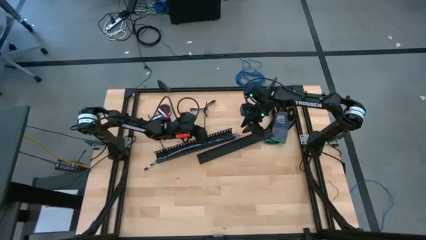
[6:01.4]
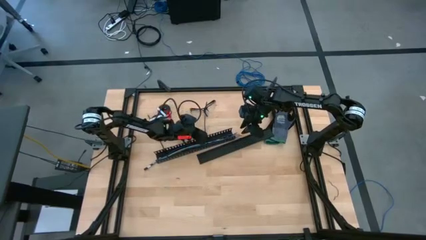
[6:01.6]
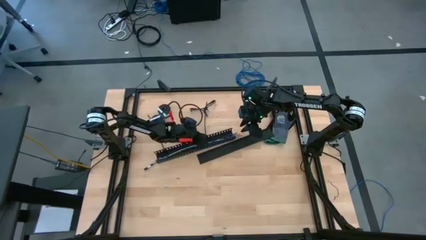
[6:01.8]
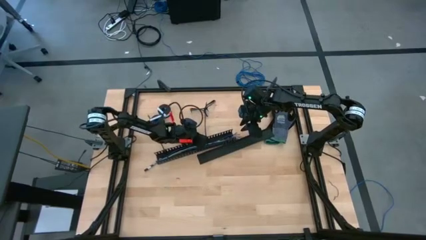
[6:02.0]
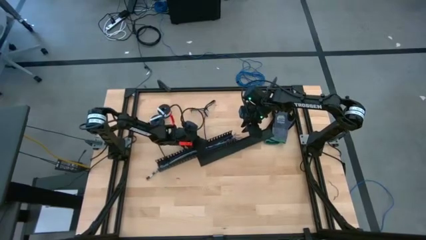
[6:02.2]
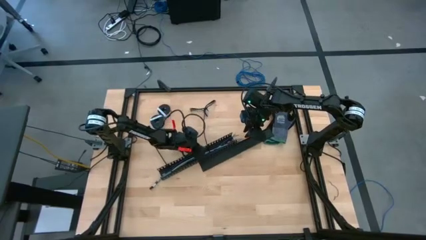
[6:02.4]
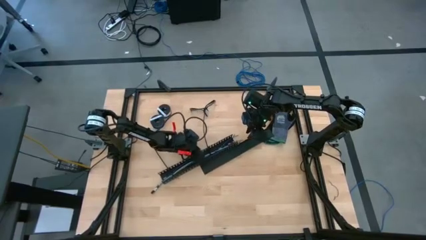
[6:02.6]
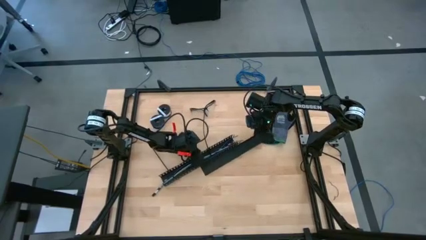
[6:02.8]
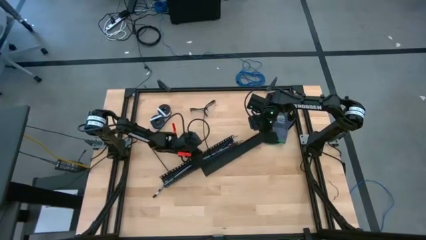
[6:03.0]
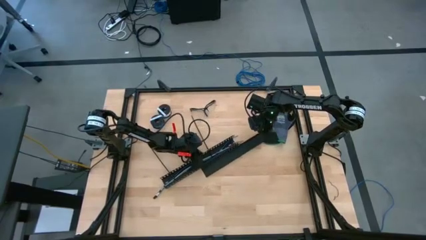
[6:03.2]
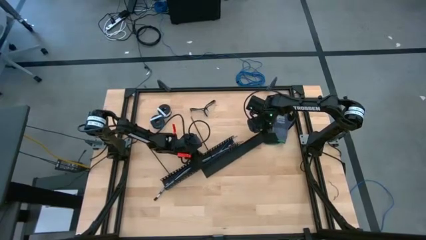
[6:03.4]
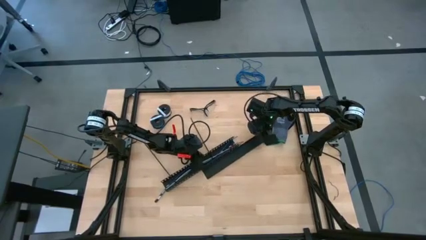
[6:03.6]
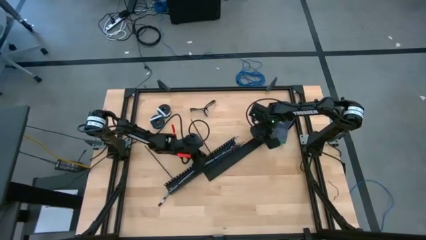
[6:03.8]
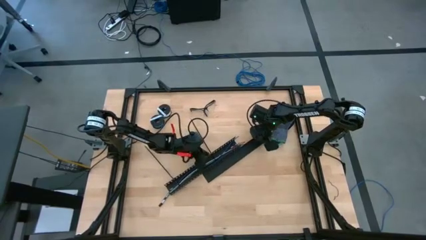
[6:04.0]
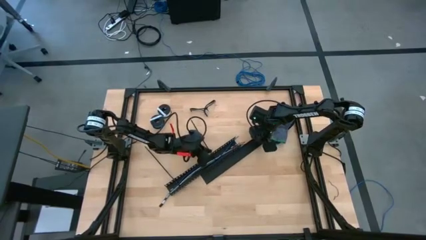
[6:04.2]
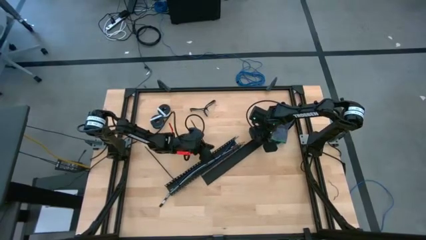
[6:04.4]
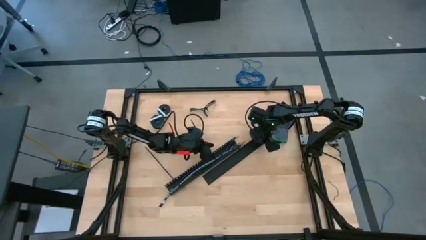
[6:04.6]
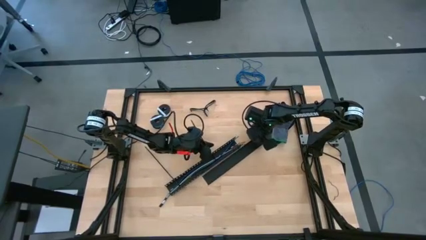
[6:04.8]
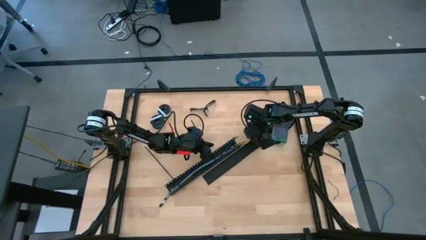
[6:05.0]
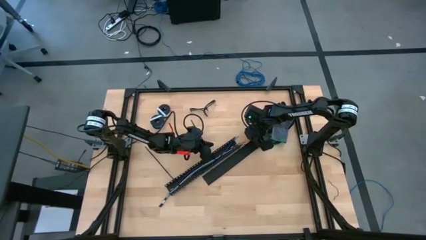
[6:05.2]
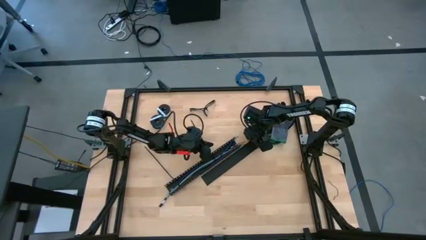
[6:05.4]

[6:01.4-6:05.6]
Task: Ziptie cables
Insert the black cover of the black cable duct

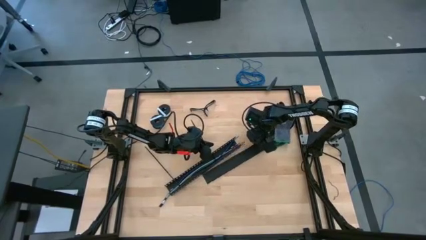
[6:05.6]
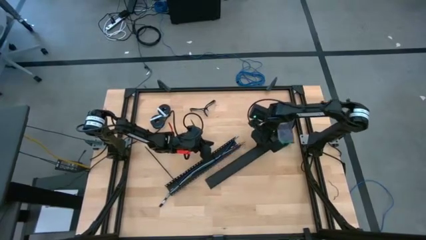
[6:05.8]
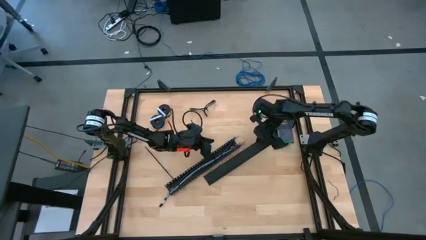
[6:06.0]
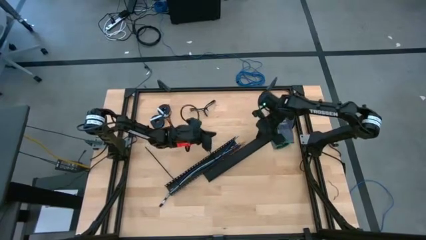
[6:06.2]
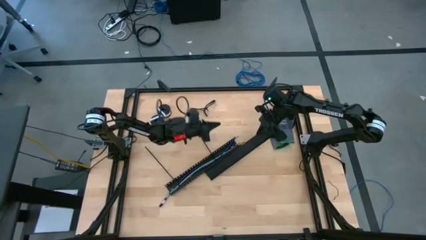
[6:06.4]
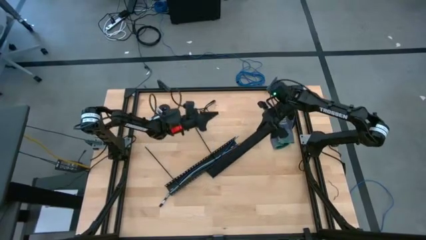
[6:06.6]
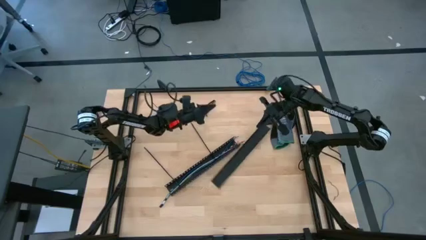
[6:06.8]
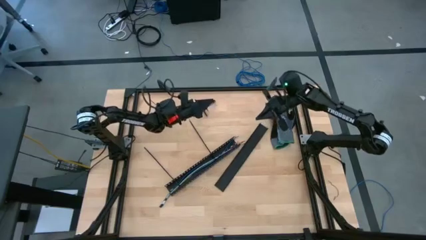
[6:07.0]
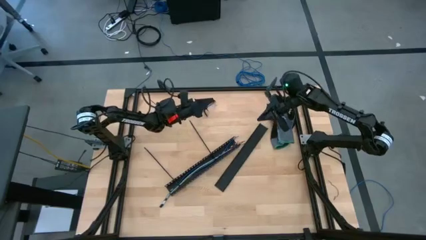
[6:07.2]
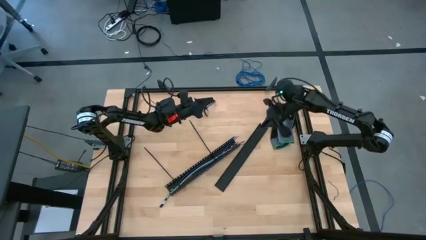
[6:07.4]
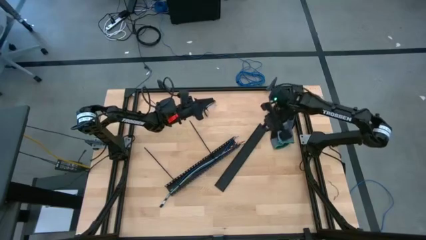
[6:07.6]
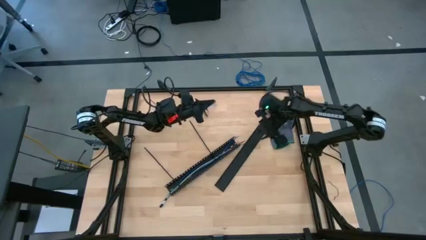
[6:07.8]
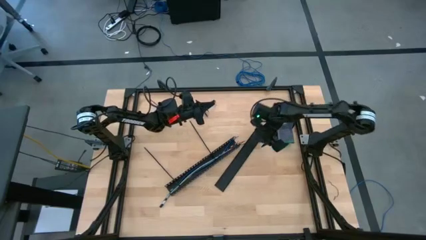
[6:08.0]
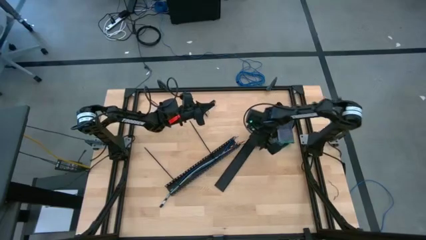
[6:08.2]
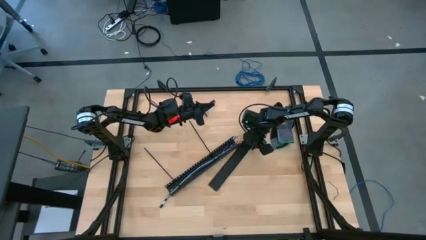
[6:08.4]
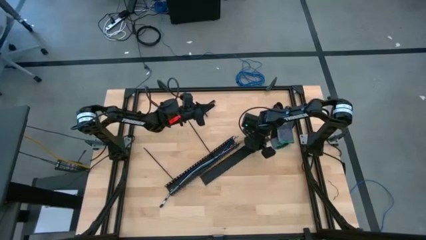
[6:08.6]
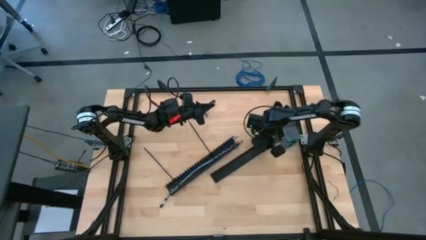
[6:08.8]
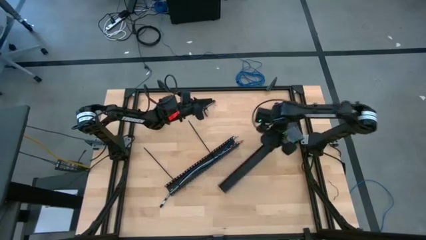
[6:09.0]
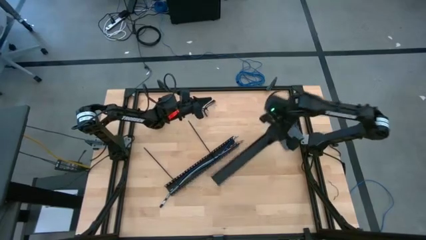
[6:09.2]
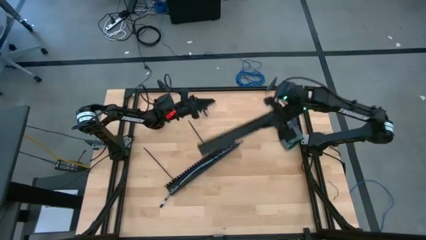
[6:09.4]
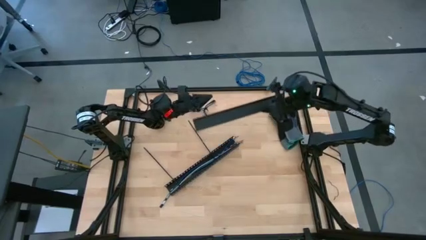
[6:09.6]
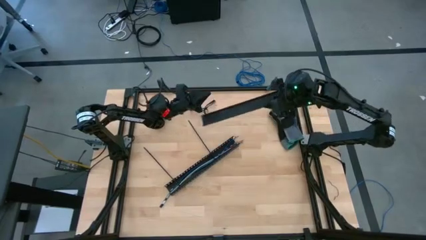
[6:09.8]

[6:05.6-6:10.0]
Insert the black cover of the black cable duct

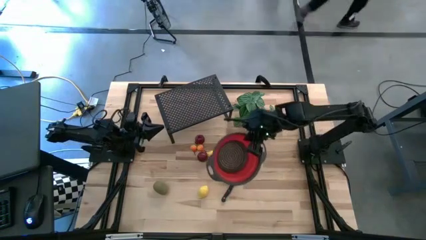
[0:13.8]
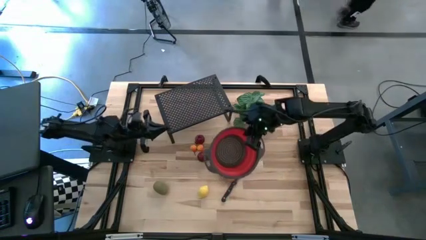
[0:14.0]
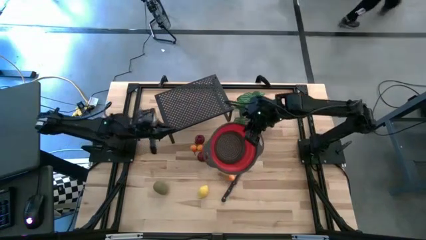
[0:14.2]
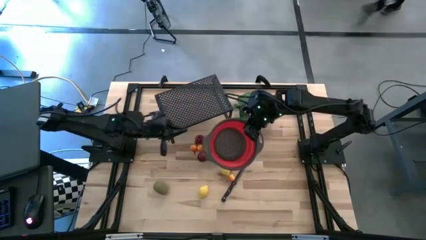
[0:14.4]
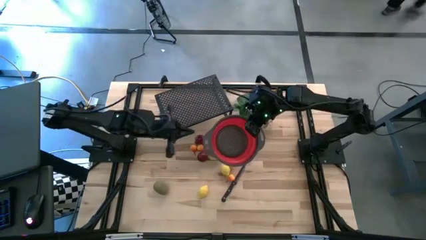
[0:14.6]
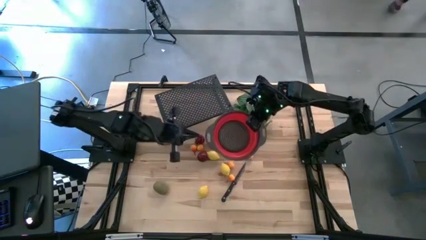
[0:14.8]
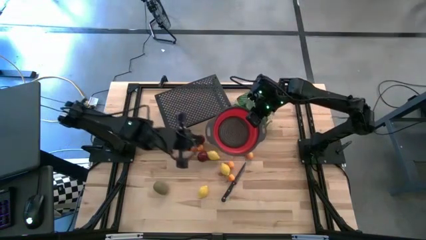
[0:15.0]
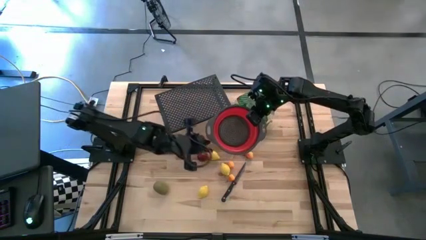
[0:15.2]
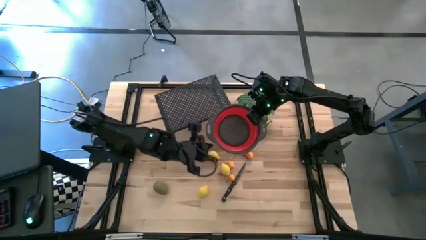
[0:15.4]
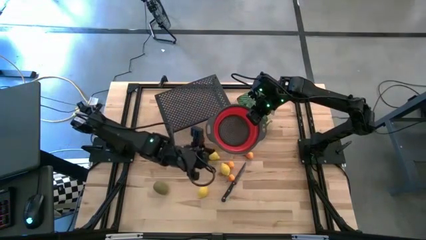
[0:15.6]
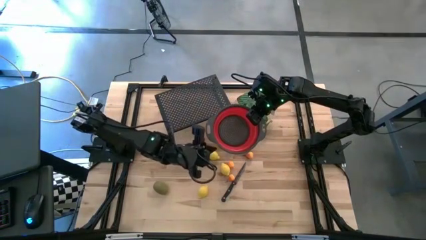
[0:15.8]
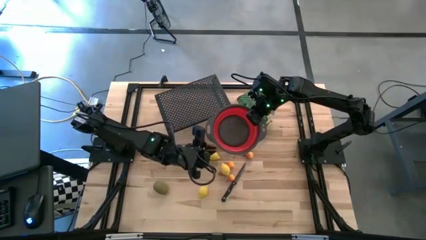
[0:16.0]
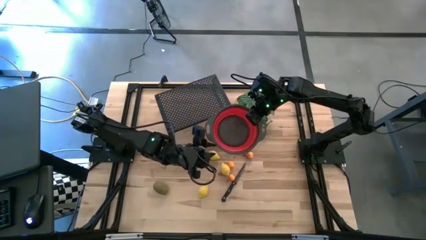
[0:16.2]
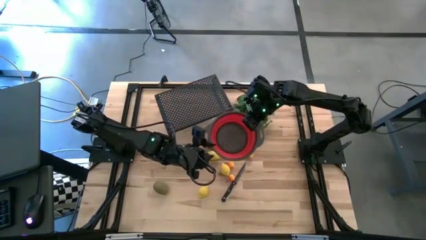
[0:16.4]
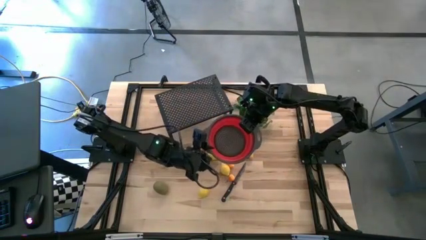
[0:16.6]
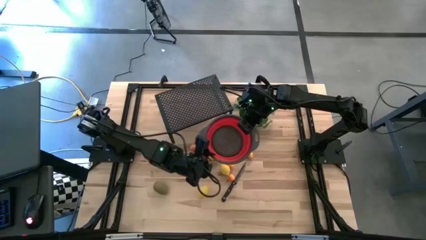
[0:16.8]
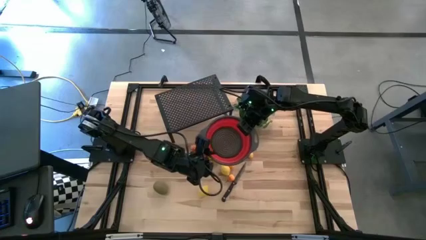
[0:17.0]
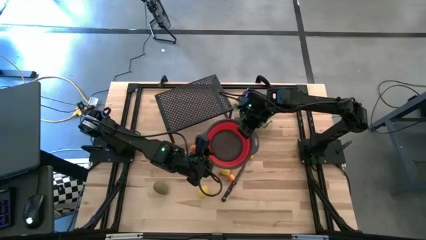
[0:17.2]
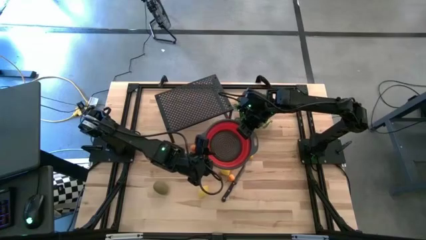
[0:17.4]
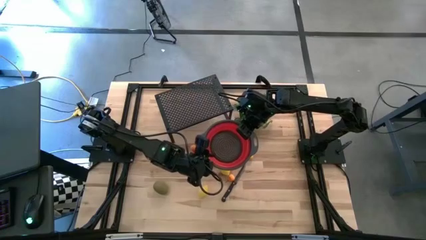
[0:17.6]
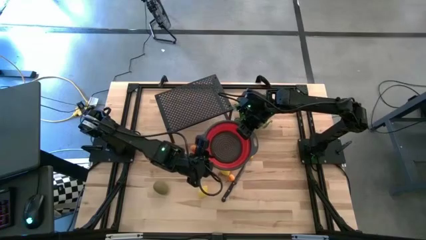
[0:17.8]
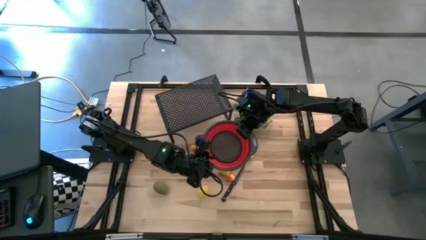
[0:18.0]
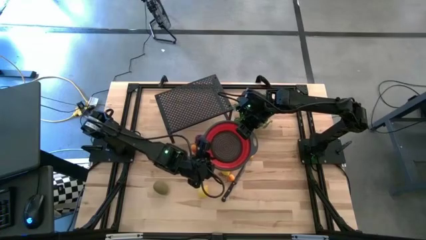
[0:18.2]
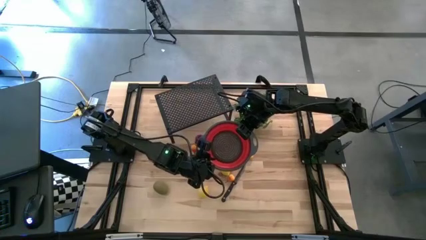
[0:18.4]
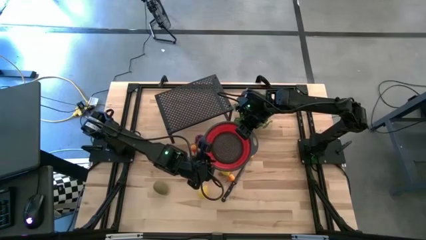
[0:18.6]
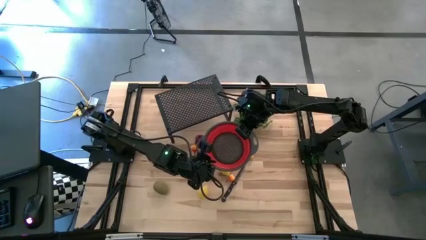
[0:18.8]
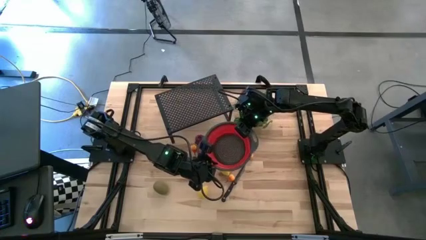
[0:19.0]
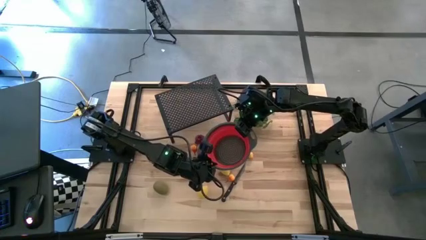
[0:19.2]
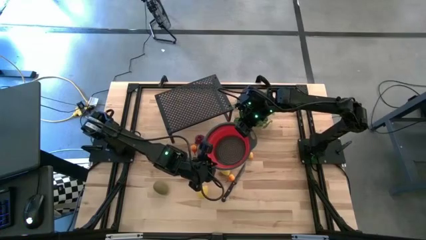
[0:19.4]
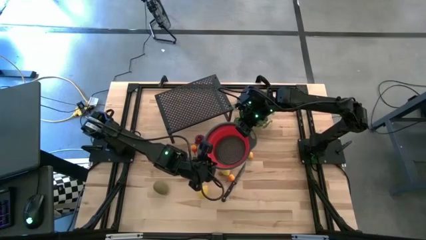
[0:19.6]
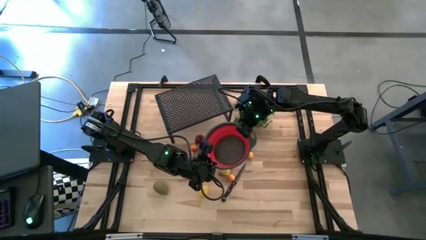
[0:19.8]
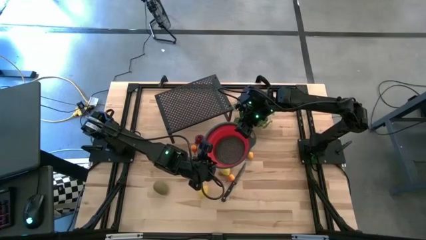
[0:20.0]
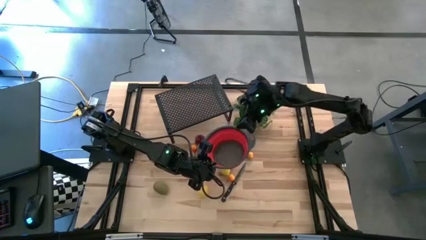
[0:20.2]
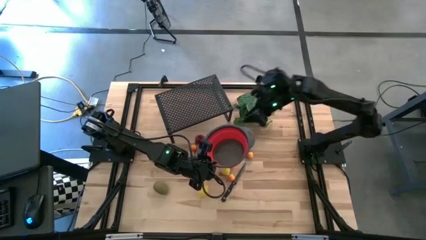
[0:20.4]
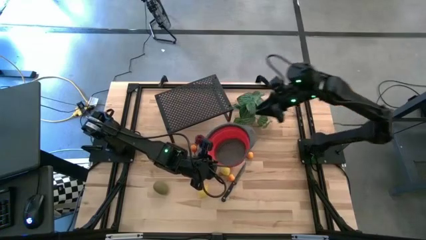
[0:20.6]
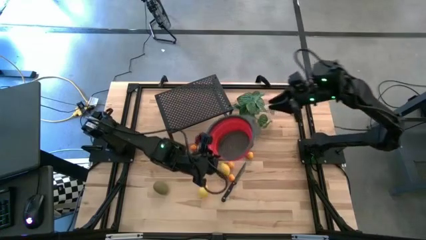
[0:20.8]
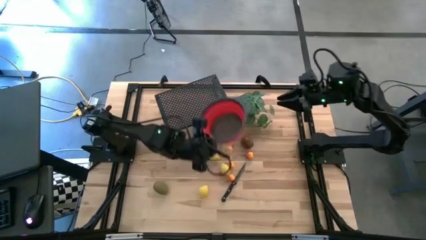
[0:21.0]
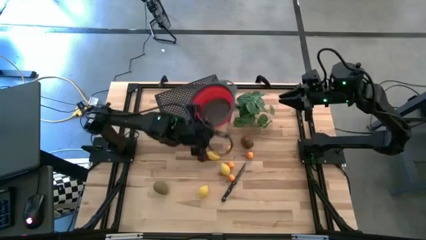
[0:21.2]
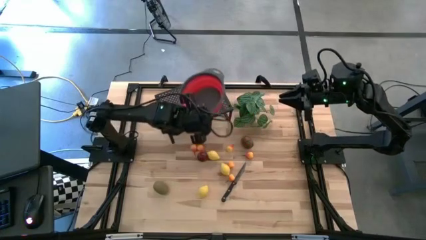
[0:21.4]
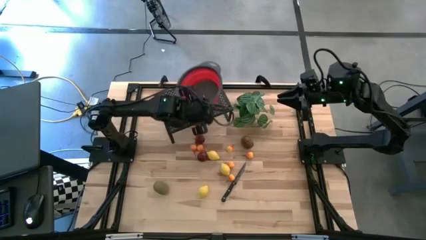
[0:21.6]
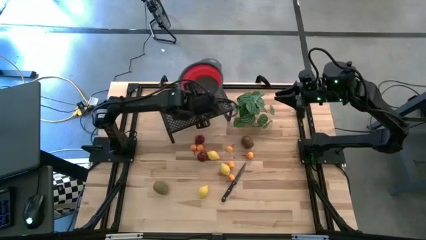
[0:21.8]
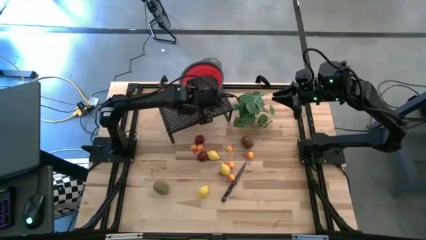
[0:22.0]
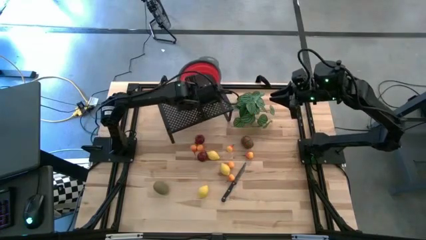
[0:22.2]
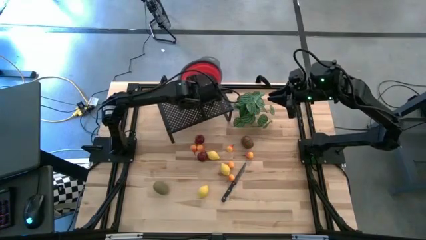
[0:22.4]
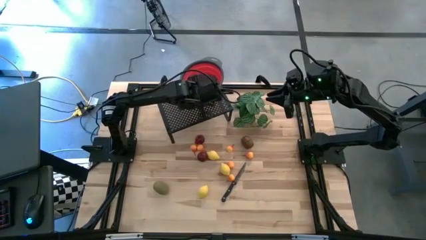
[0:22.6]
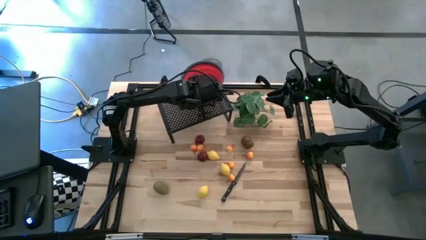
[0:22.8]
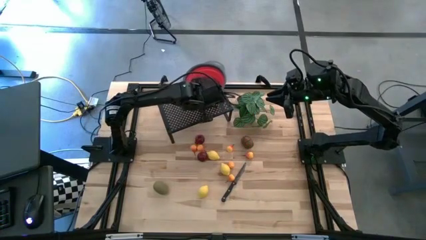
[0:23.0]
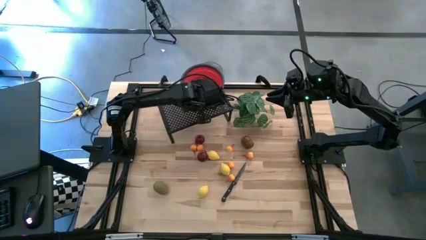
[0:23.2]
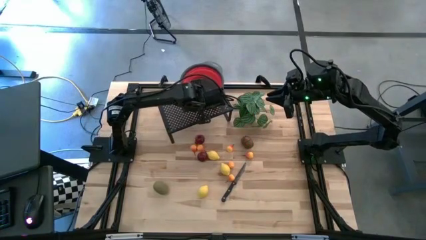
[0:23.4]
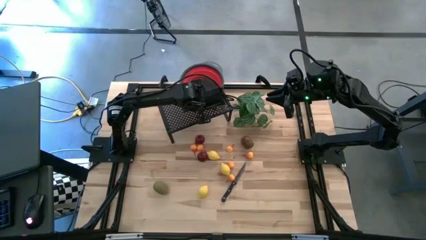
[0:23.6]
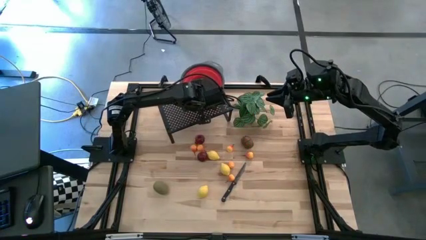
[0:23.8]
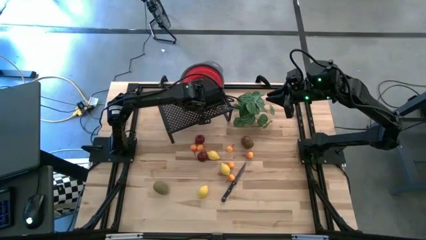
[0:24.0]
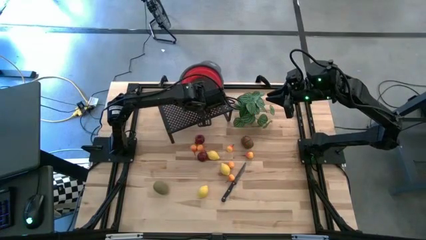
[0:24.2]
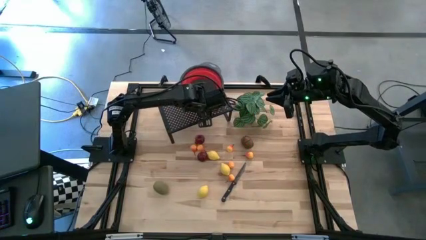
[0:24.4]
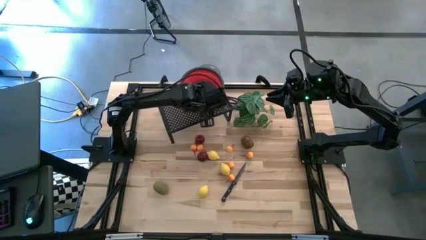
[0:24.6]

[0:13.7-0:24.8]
Task: Pick & Place Fruit
Put the red basket on the shelf
